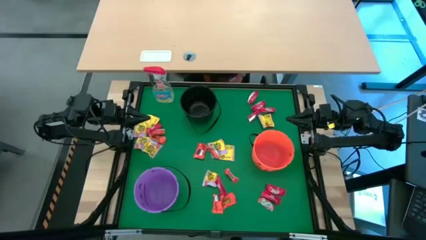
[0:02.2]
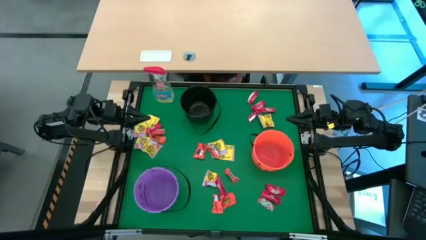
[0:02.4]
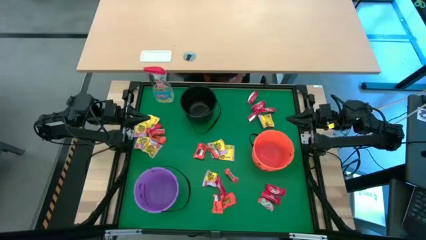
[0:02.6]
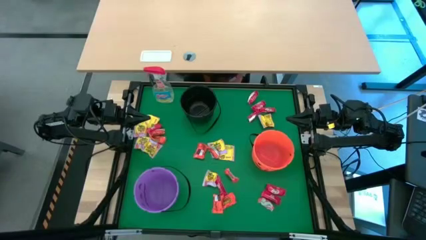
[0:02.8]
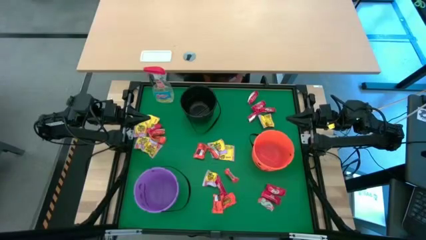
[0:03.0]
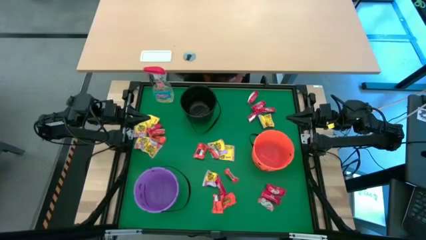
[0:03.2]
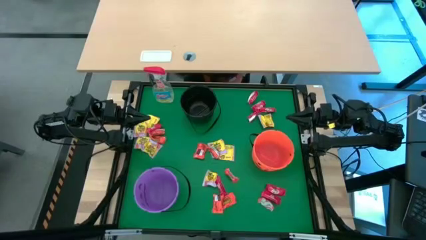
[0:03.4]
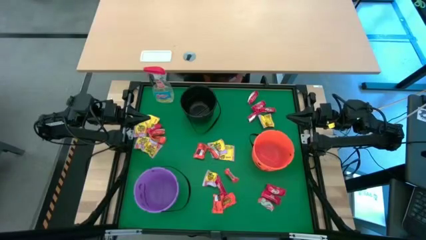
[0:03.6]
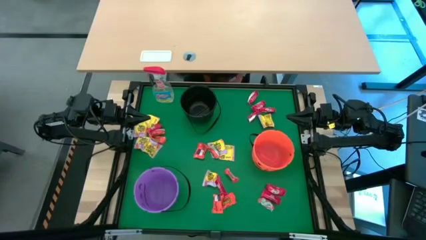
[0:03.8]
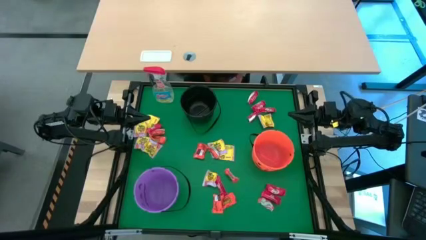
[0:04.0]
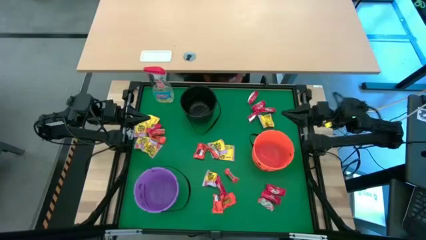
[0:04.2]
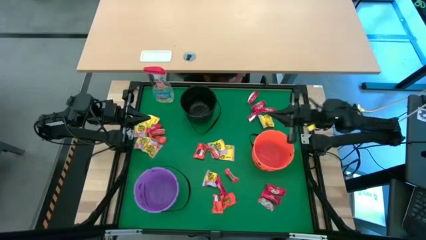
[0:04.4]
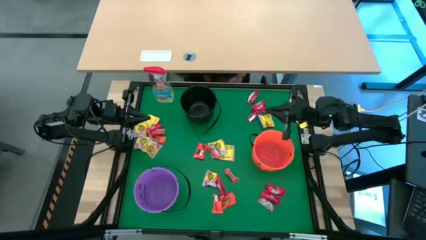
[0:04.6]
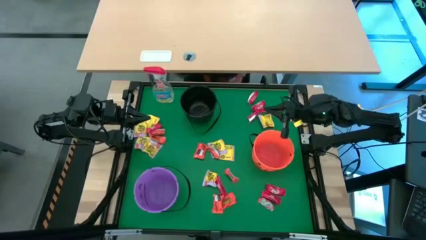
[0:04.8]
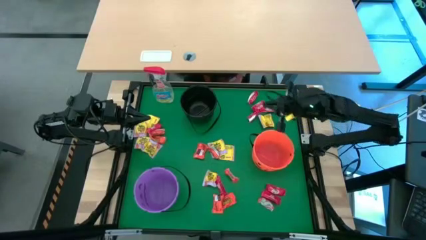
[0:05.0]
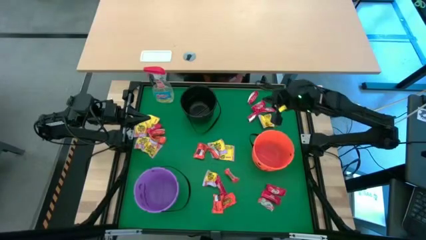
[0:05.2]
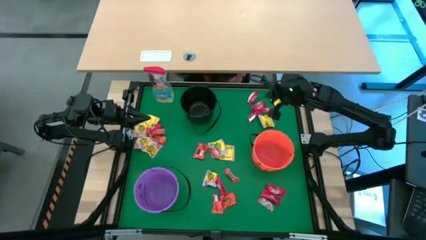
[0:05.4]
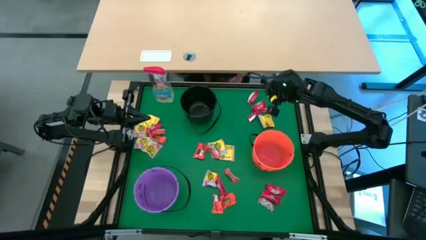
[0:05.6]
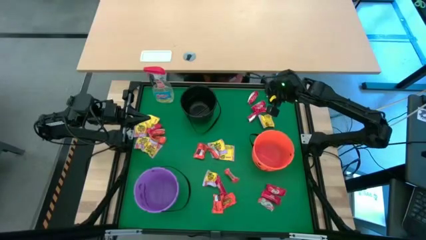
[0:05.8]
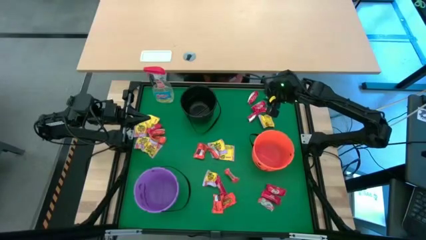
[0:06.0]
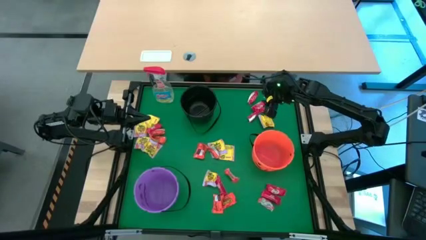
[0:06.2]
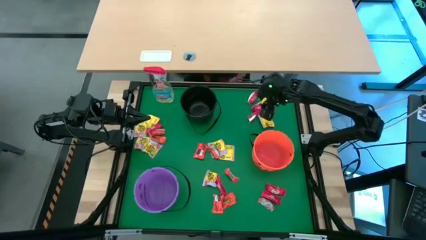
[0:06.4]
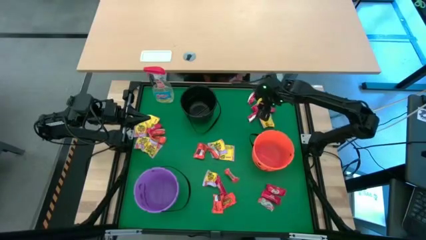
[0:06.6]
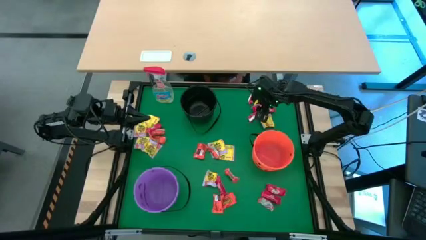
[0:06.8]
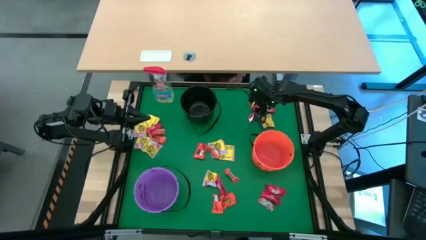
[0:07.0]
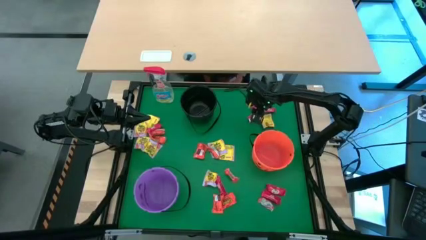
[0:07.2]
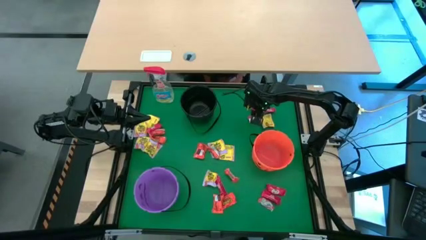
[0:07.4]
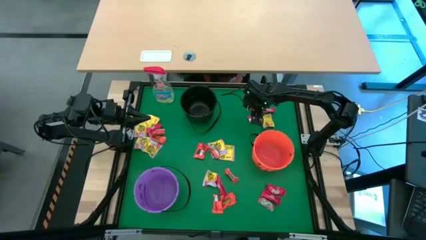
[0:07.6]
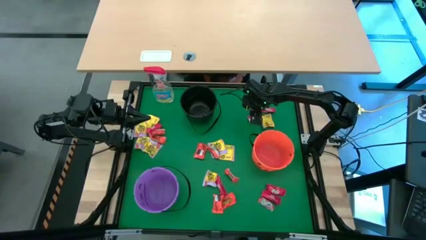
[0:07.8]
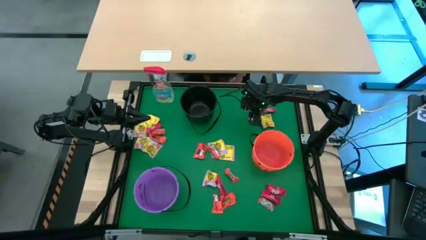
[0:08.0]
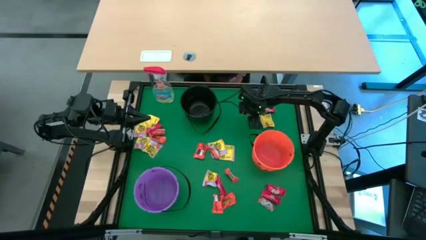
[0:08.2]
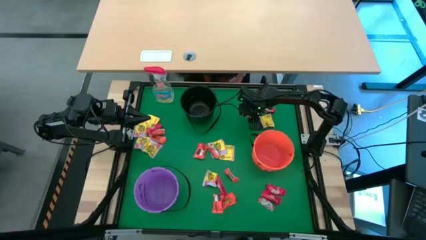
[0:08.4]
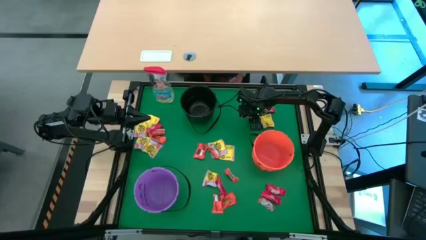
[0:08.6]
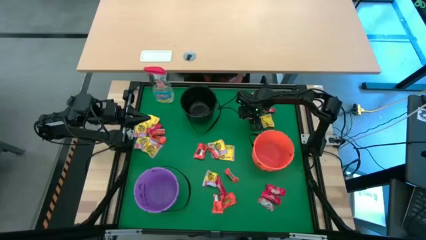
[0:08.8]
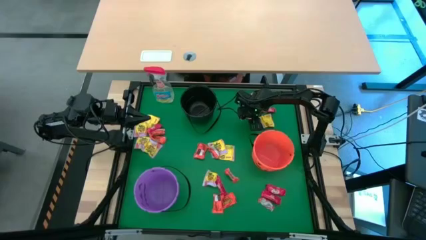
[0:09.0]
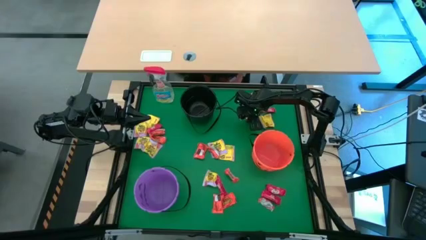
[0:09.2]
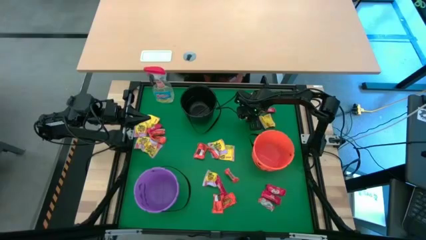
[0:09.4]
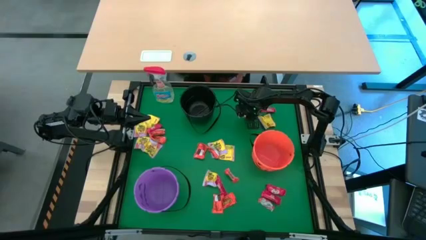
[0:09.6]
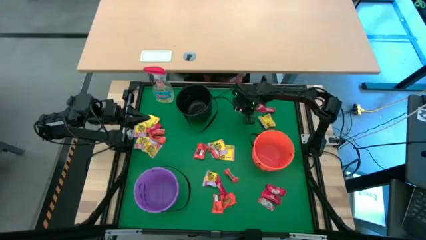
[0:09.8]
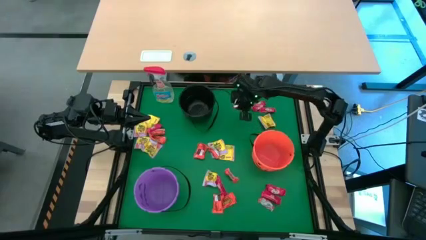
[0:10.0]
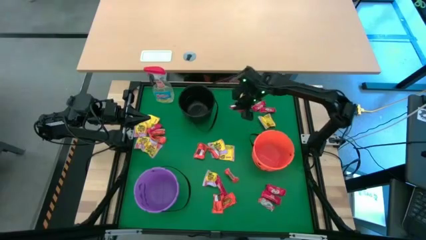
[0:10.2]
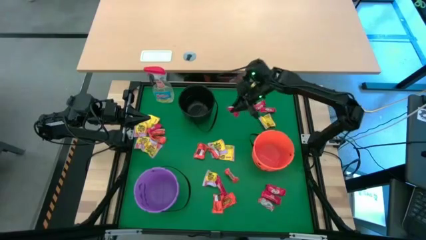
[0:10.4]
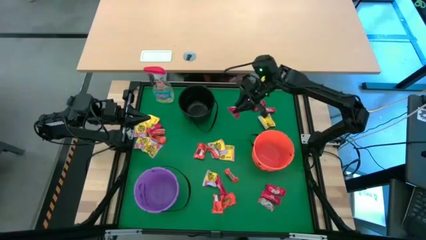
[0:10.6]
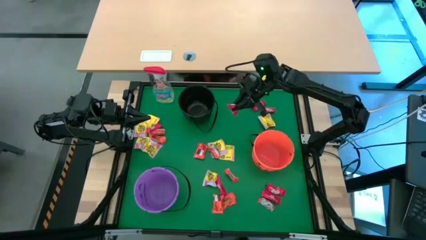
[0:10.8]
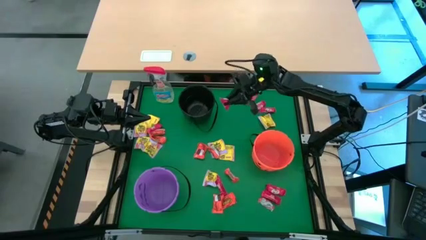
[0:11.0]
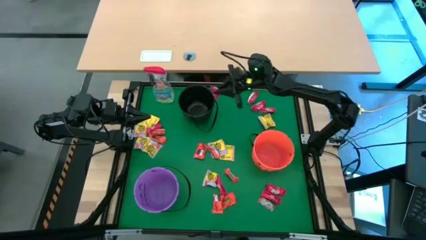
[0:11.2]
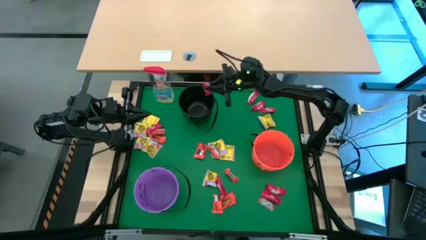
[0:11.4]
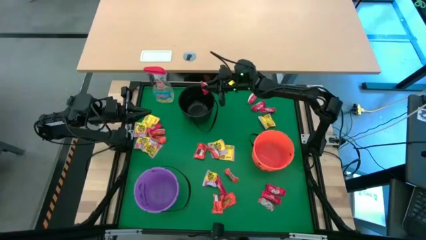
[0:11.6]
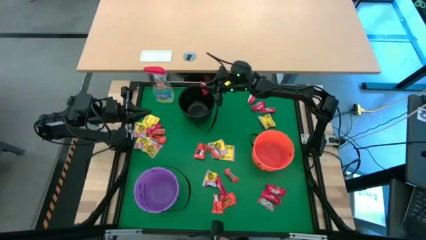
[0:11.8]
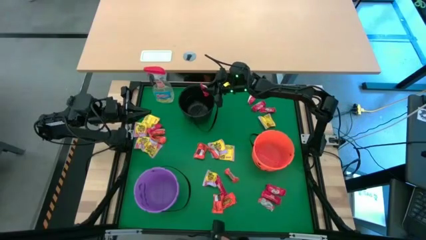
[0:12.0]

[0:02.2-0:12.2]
Task: Sort candy
Put the red candy into the black bucket

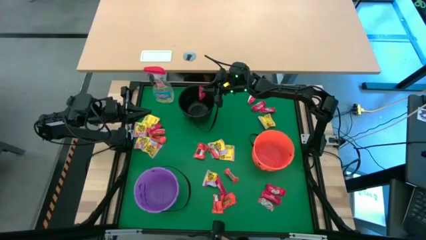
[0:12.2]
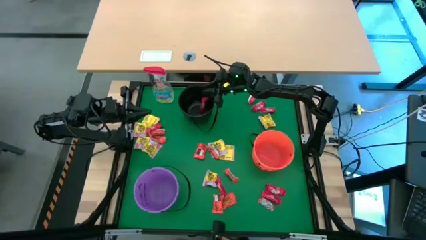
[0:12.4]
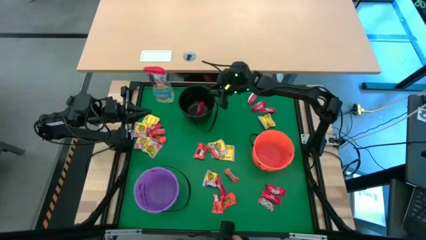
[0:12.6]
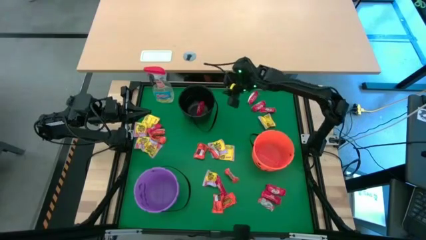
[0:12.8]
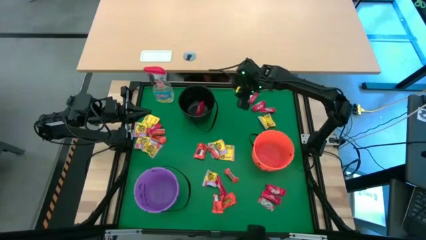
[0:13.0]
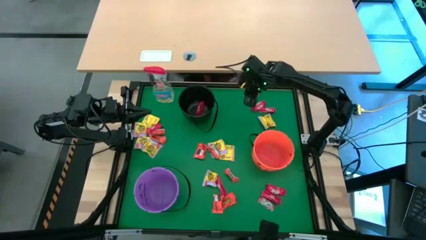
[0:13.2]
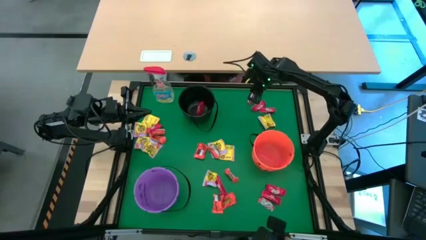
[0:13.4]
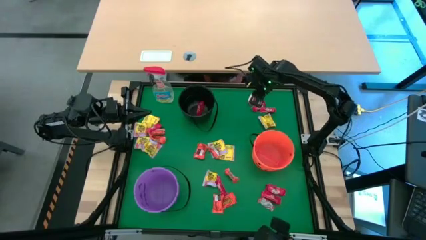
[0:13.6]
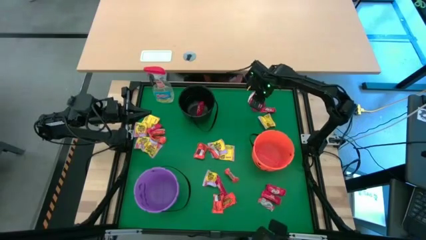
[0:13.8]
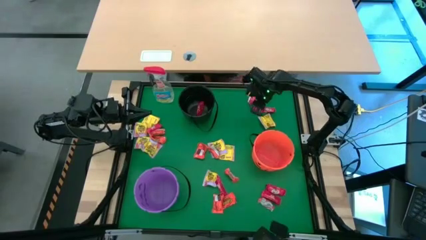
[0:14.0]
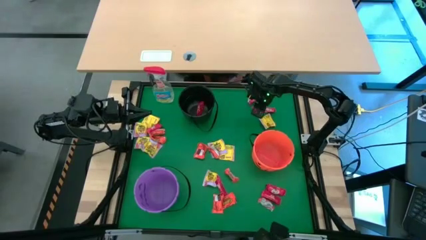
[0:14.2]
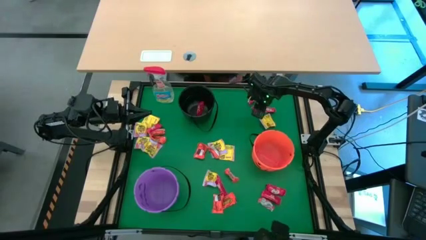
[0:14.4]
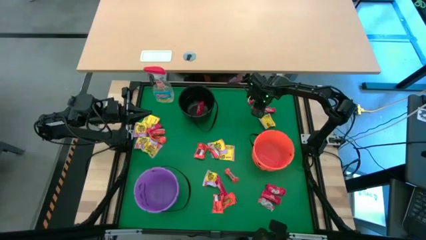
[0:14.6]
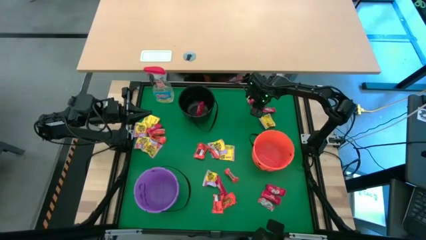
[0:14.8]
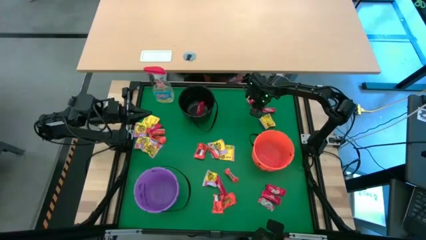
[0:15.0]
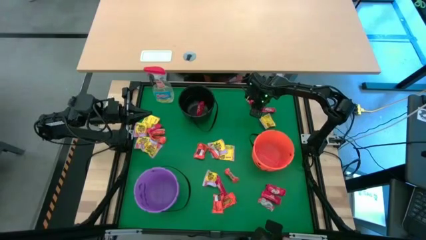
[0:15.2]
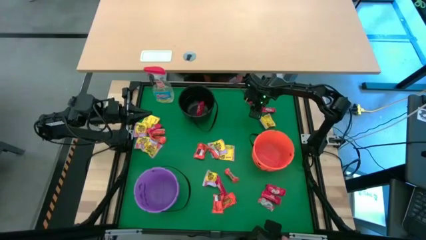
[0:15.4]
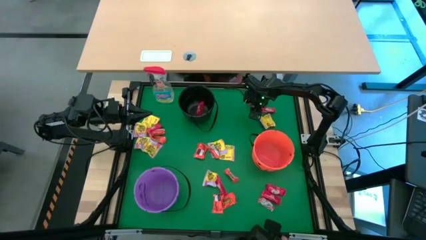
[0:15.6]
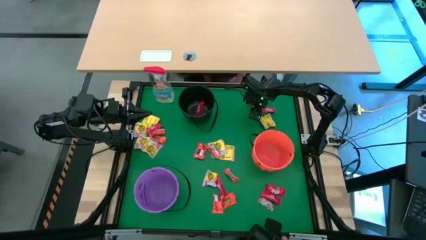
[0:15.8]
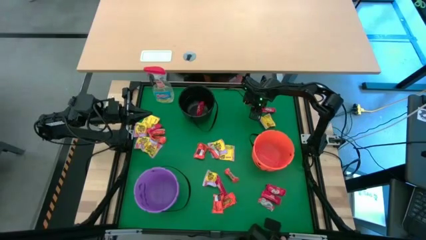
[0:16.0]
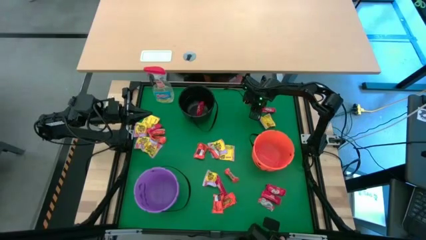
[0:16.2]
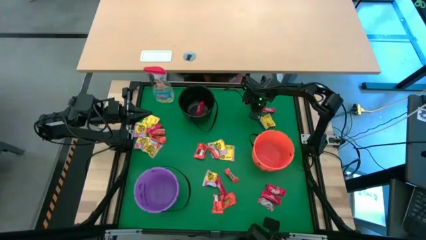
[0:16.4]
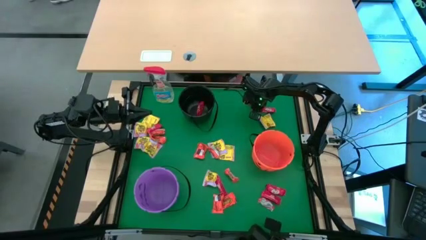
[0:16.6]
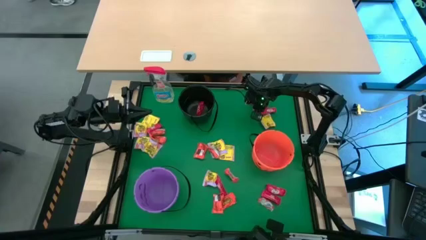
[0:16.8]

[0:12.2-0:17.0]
Put the red candy into the black bucket

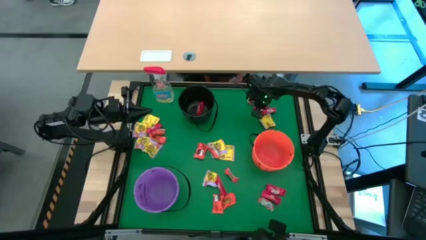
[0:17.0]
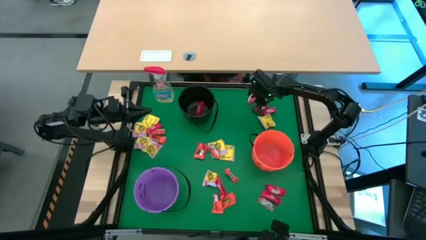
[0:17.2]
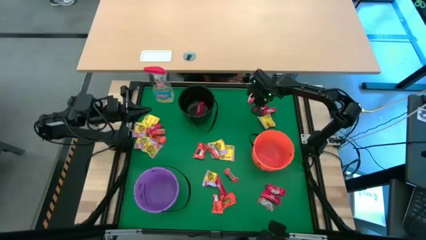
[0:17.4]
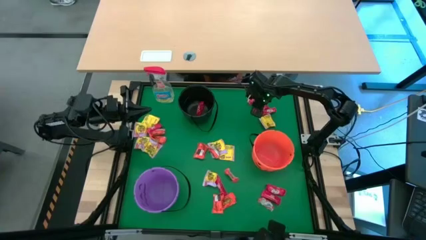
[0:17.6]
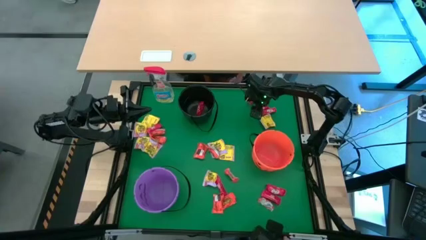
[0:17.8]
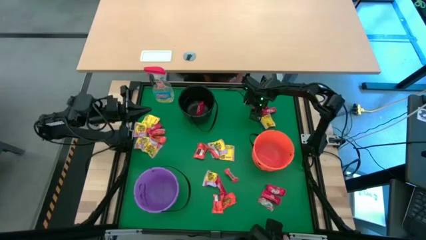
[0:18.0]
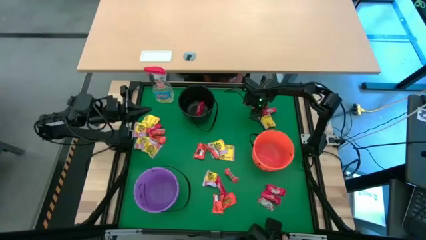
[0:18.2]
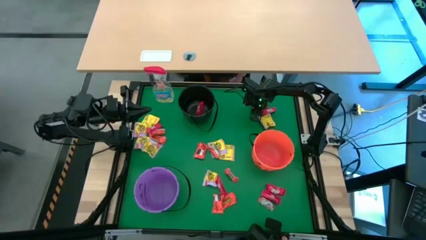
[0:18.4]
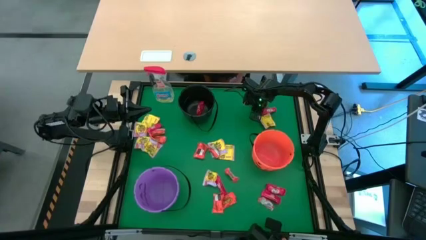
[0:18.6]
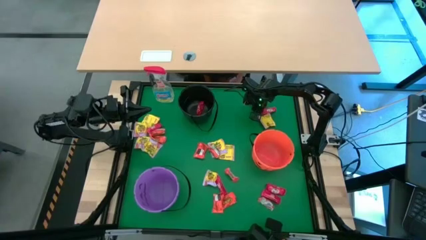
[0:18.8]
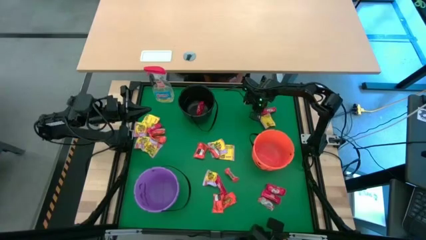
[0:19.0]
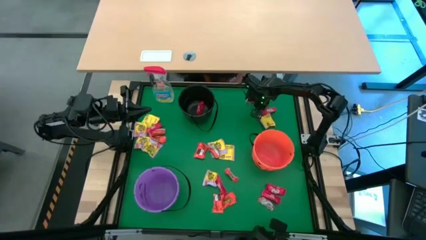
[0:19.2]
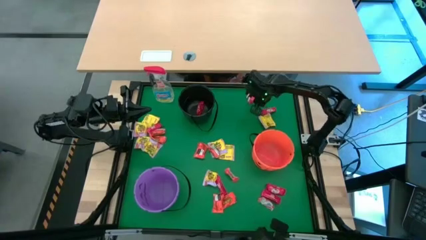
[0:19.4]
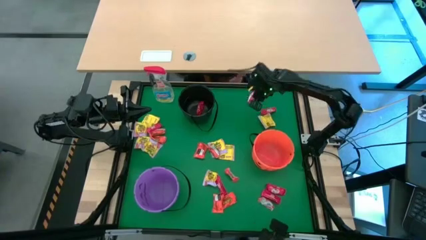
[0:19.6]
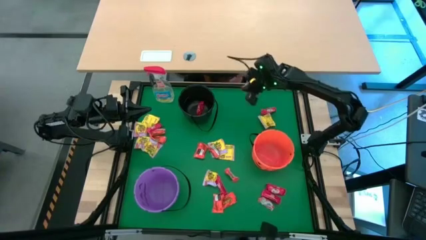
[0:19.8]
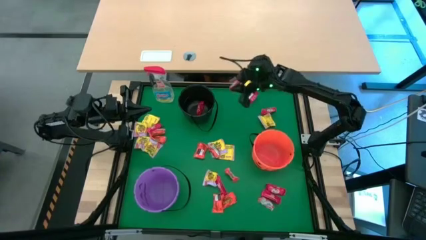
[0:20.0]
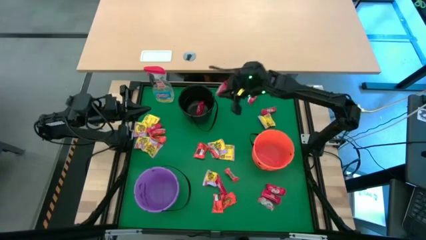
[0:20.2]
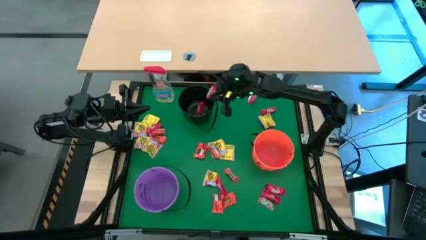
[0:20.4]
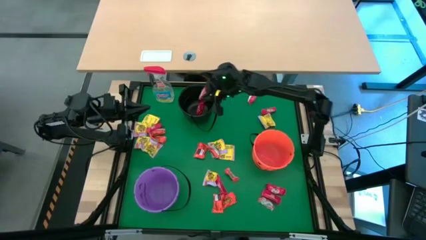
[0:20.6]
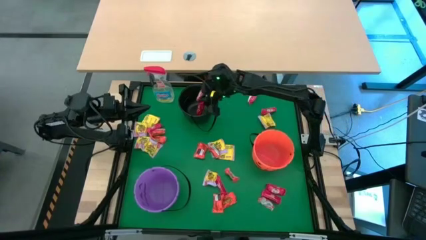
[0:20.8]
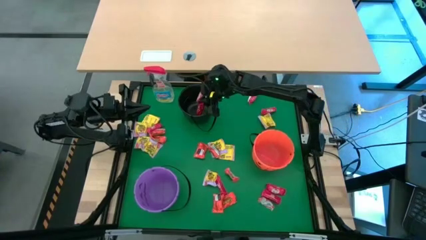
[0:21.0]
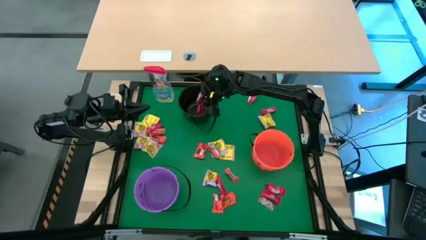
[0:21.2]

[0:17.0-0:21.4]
Put the red candy into the black bucket
